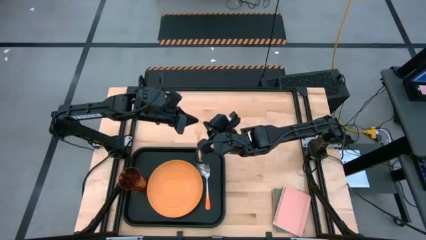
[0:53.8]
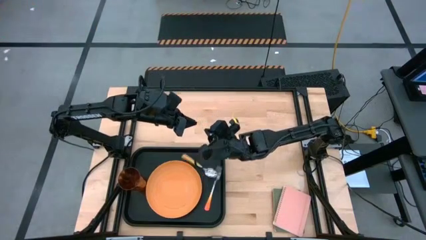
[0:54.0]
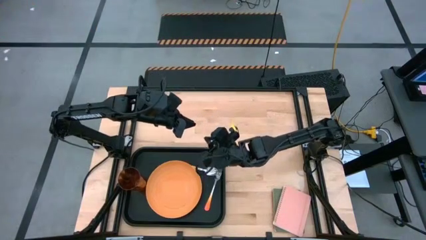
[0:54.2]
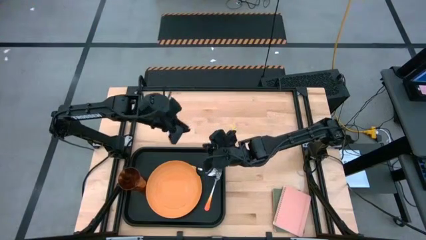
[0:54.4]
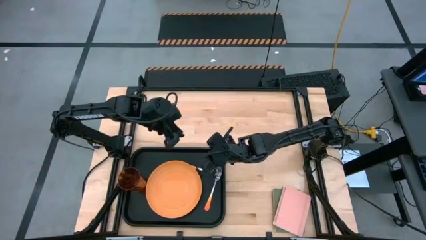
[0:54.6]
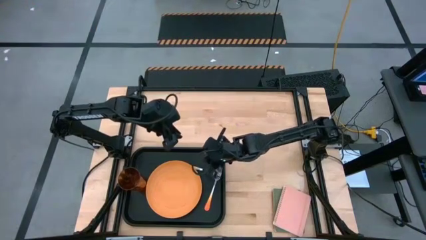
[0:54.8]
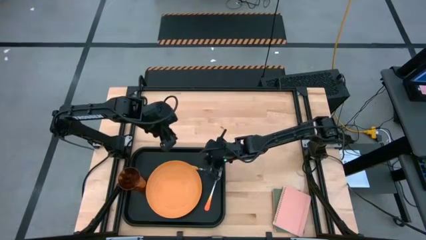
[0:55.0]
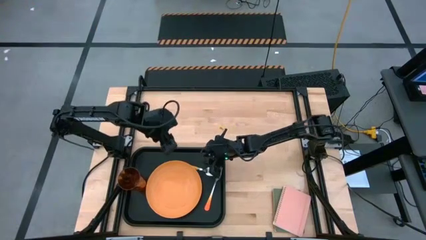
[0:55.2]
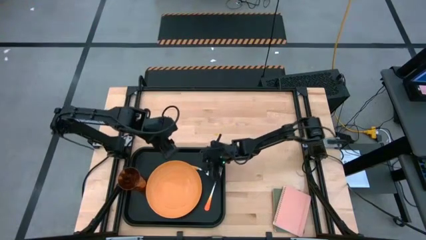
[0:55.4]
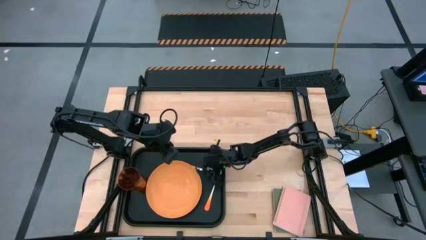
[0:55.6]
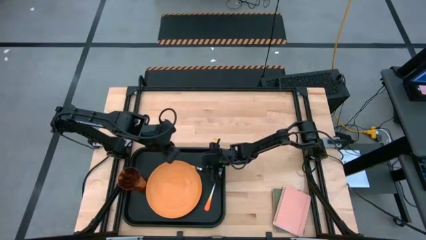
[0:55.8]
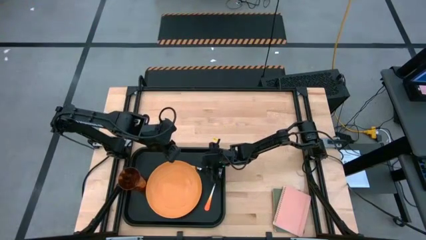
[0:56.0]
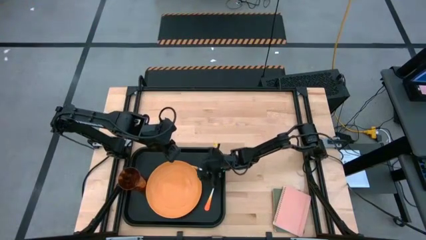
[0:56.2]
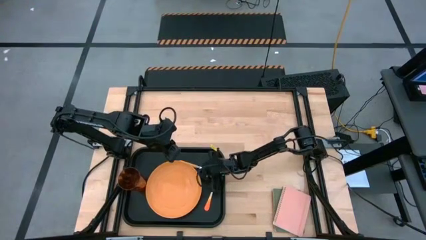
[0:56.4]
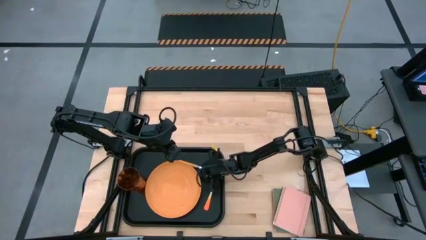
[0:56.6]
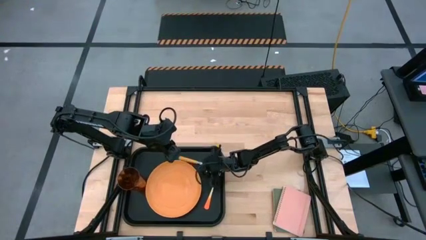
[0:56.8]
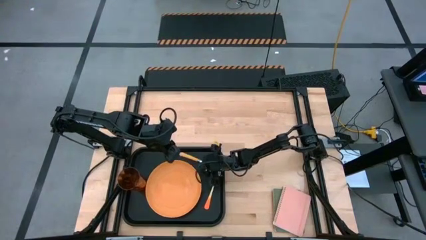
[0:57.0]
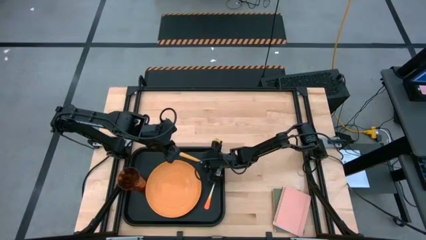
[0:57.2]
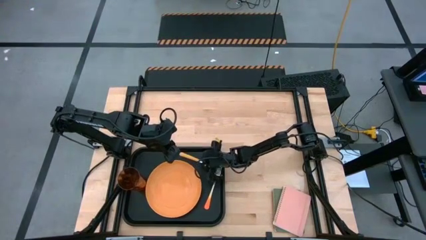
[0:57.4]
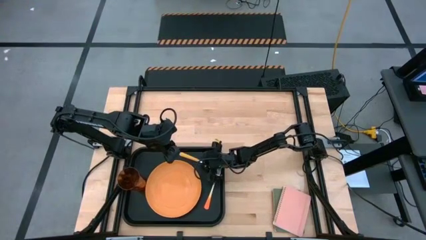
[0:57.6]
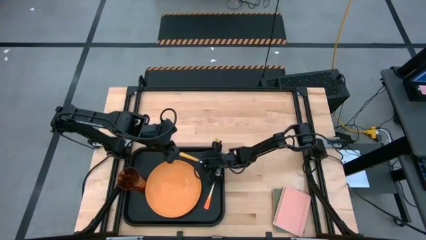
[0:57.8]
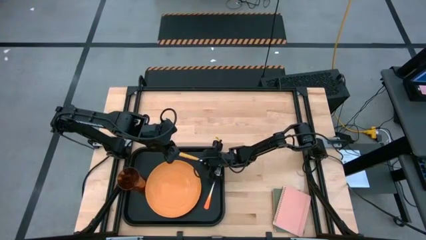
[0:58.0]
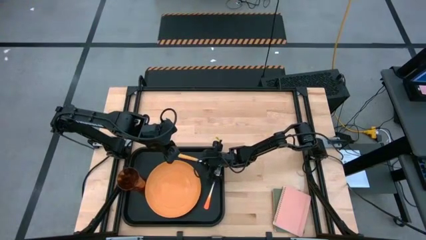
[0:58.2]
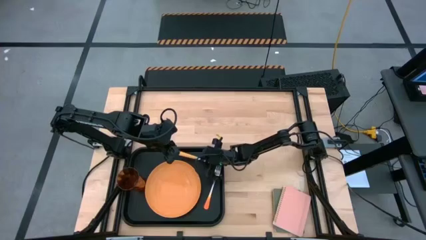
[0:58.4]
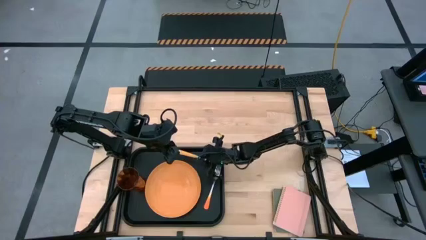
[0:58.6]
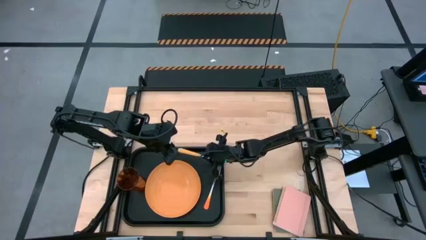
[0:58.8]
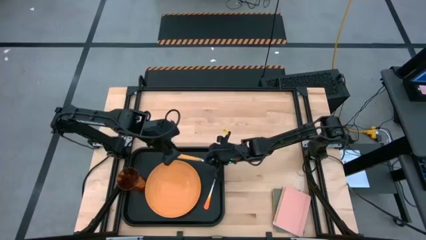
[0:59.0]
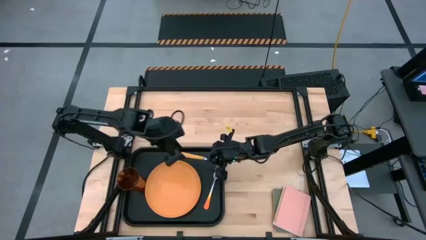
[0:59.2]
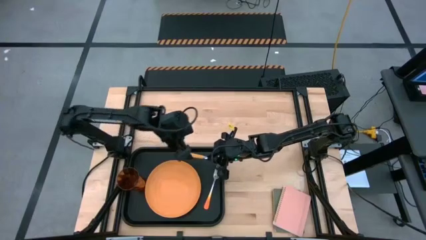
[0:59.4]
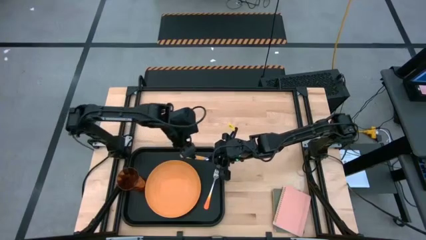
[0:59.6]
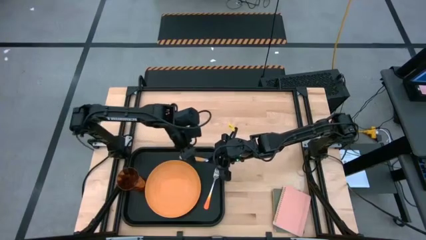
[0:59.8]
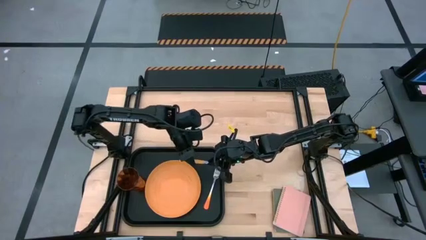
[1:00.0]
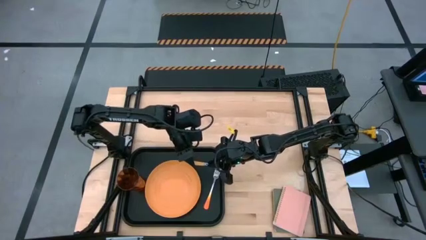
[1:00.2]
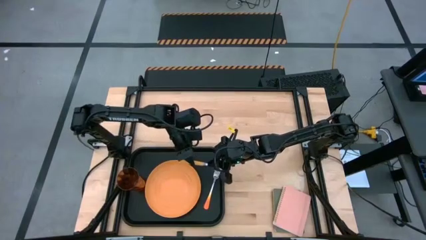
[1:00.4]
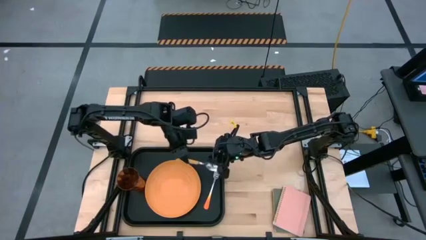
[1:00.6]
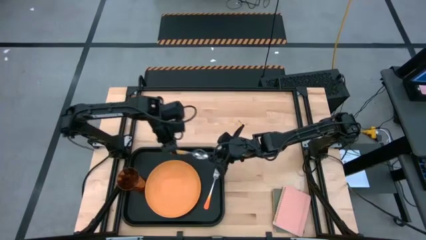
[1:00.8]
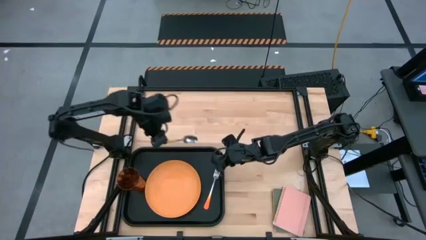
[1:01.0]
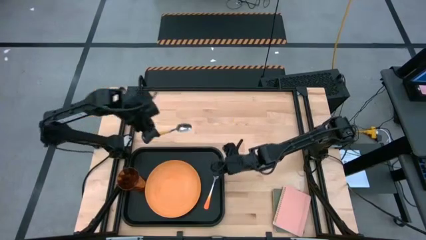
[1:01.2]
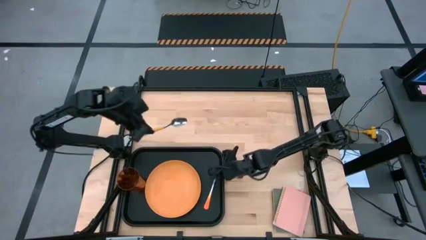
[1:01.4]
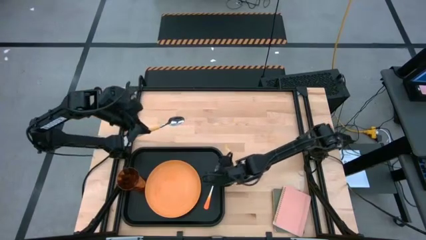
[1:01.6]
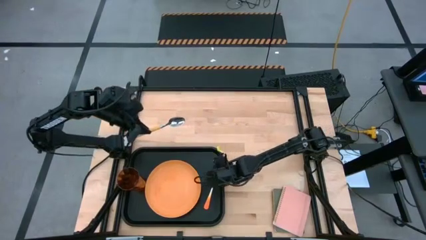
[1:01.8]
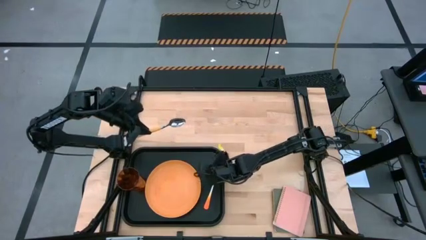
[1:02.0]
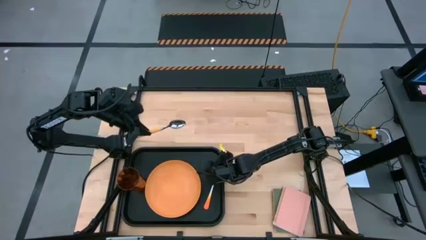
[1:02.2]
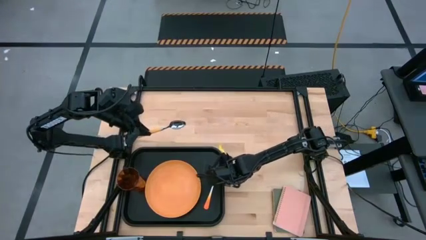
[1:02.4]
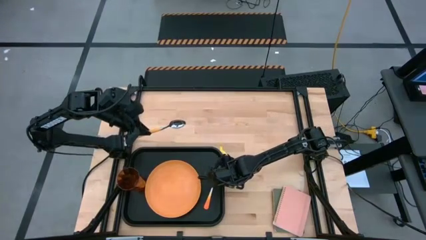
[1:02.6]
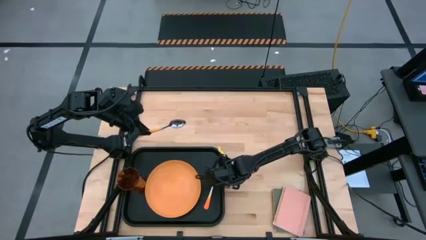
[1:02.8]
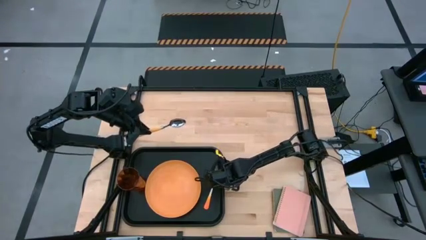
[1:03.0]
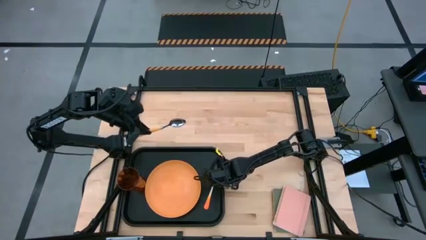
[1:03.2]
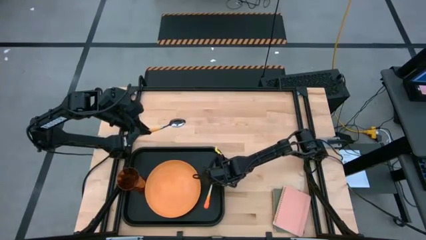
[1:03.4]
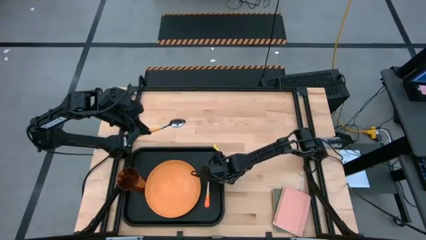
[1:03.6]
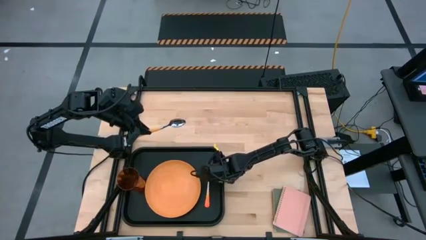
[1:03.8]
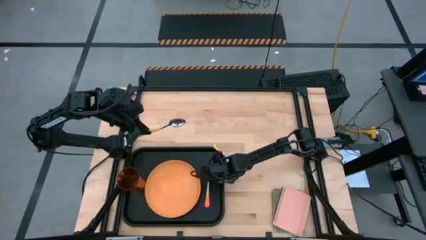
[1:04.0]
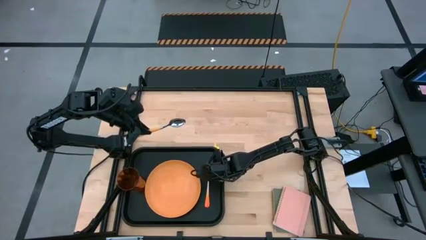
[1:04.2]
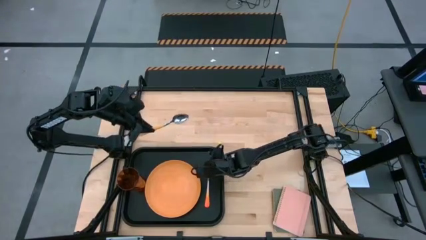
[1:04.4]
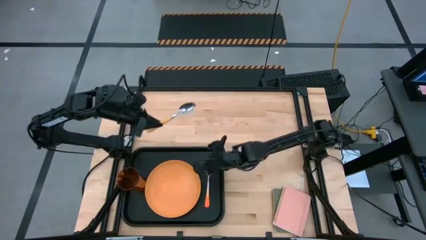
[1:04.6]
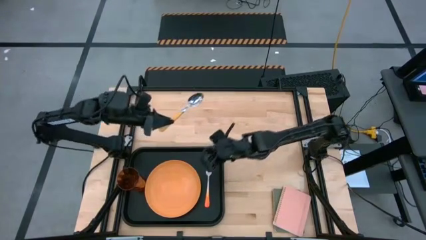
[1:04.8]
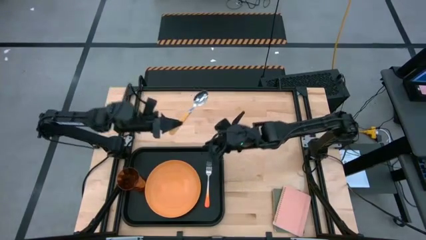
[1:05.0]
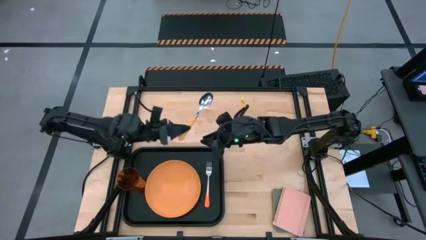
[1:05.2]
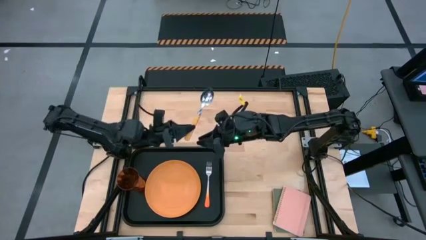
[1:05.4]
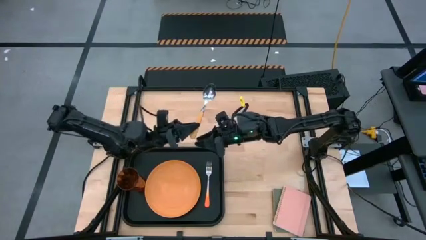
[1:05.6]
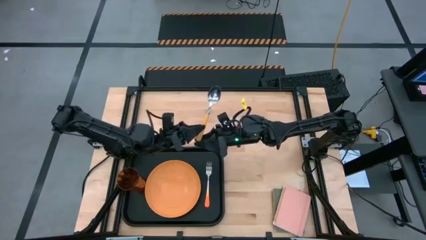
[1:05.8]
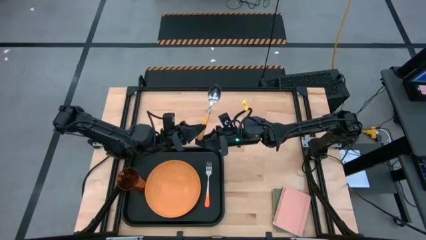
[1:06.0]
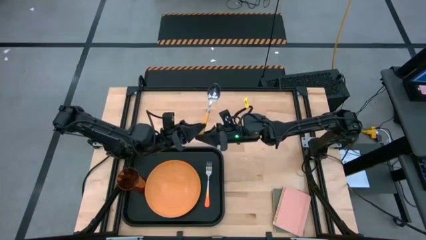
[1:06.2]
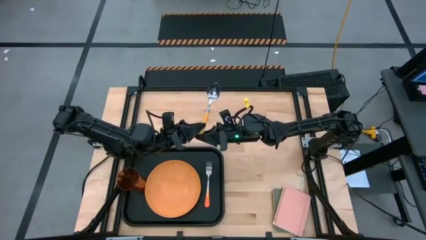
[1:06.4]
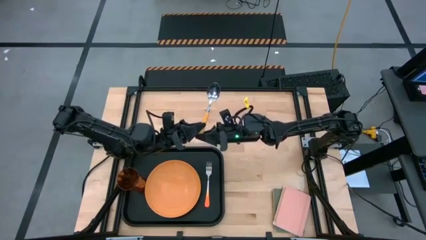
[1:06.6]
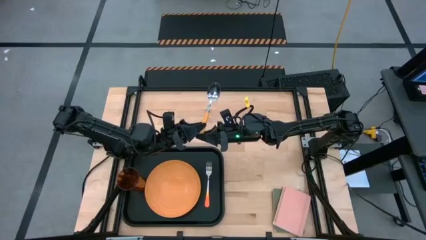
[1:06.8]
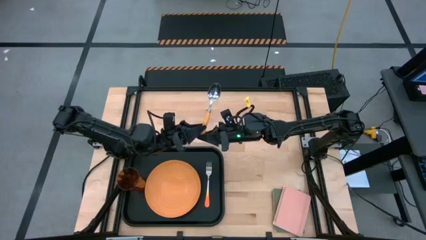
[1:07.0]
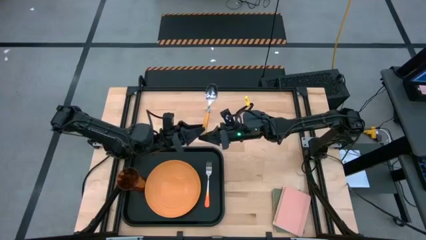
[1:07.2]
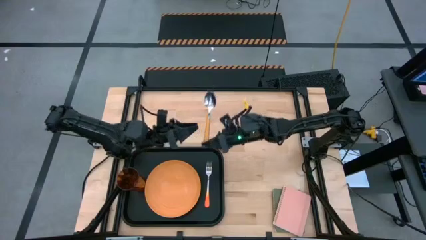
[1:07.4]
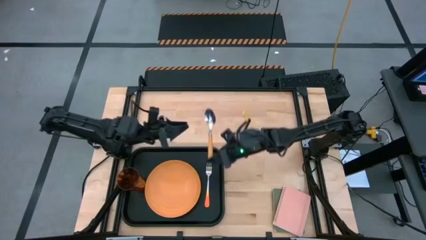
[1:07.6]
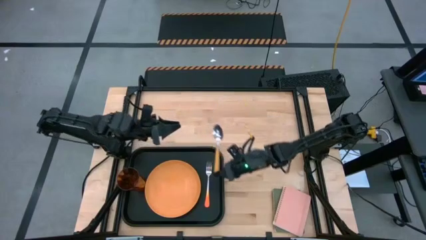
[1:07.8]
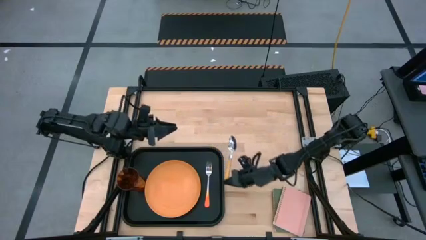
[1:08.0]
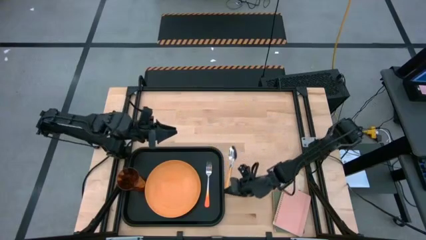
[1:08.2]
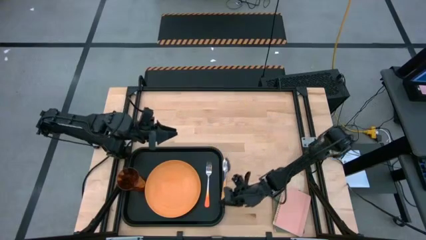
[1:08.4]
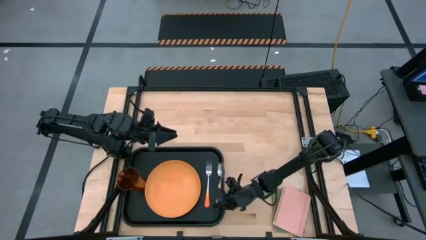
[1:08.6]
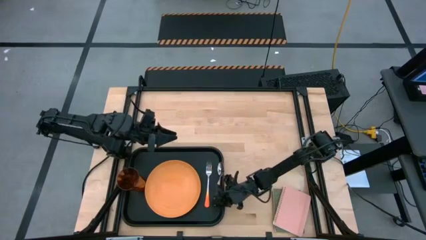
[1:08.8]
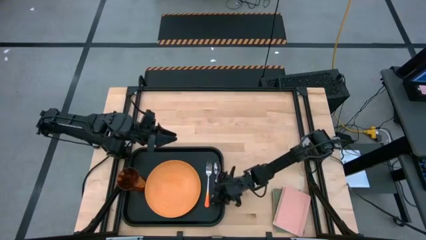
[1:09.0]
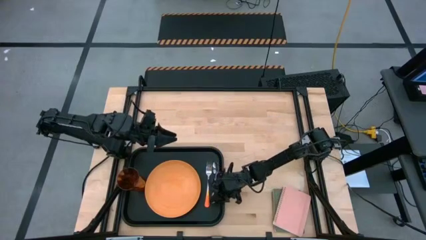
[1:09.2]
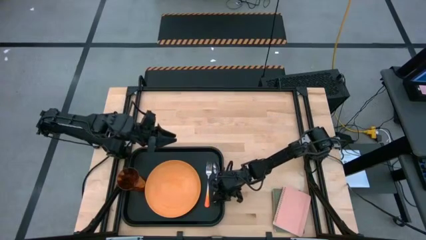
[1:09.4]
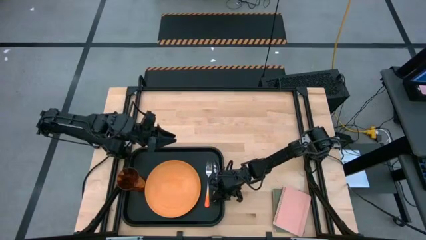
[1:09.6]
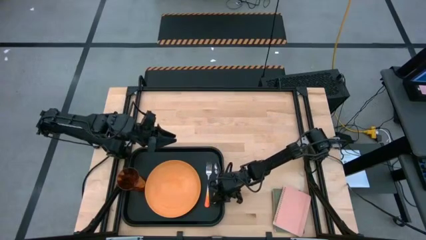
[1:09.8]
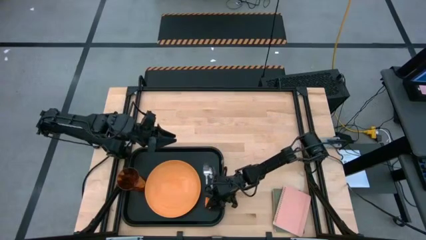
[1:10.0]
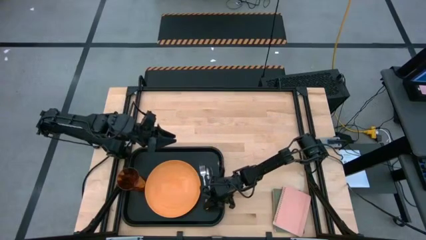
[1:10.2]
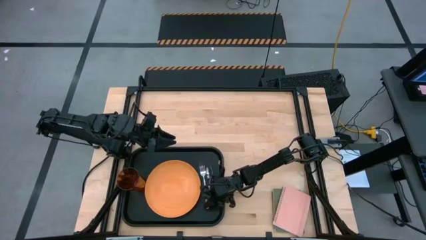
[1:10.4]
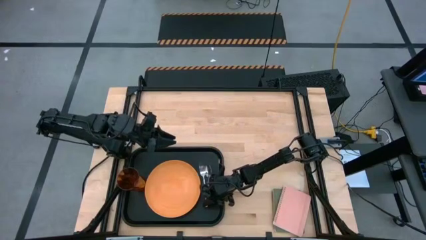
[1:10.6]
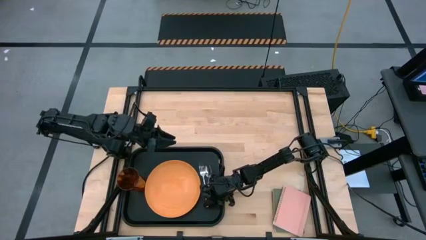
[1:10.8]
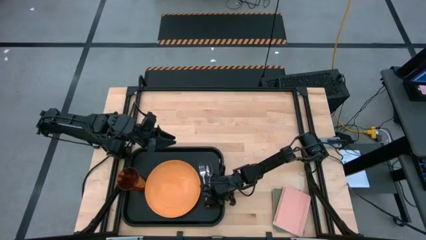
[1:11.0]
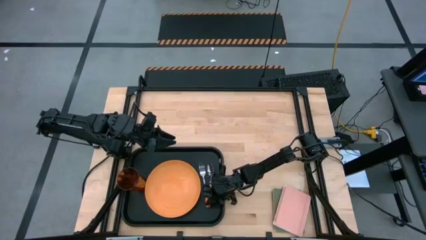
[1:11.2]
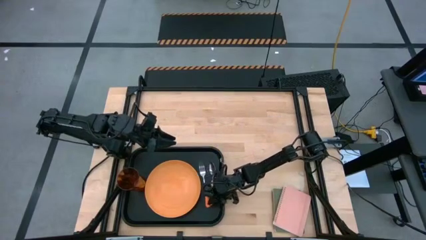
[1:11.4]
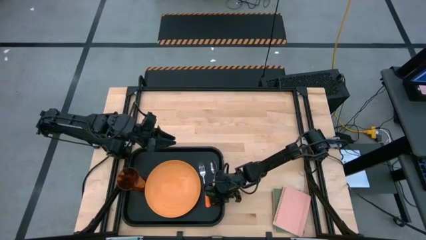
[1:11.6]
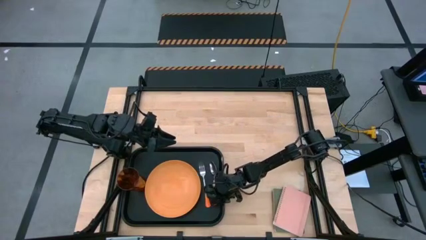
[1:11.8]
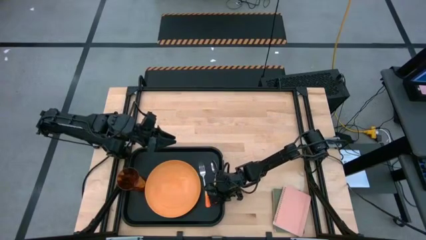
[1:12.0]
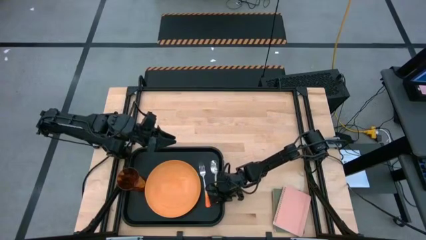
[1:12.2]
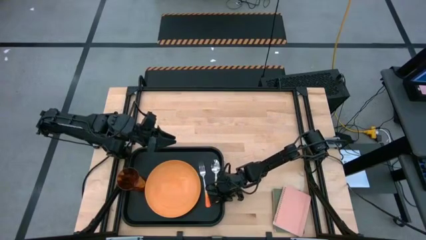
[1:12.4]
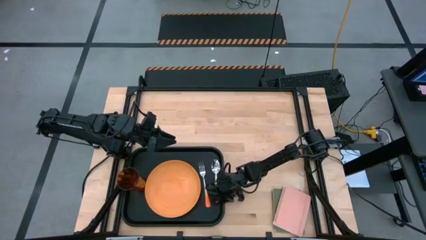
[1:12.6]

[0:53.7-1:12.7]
Task: Pick and place plate/cup/fork/spoon on tray
Put the orange fork on the black tray to the right of the orange fork
